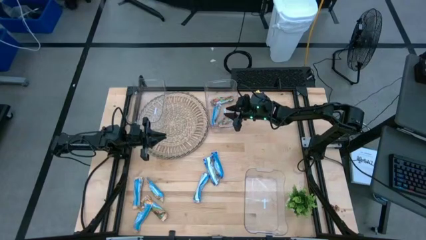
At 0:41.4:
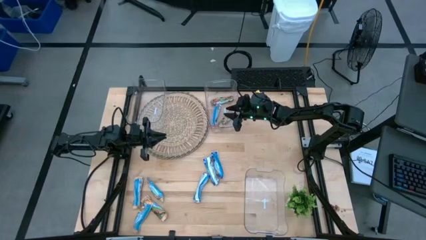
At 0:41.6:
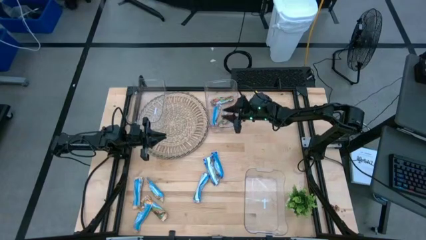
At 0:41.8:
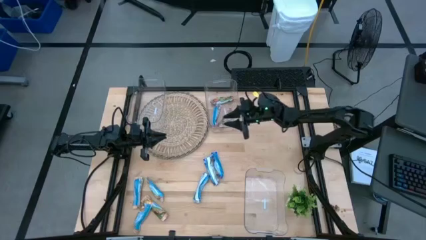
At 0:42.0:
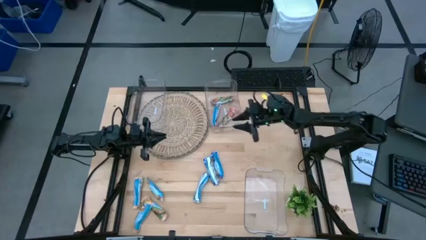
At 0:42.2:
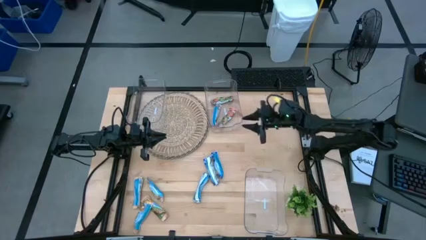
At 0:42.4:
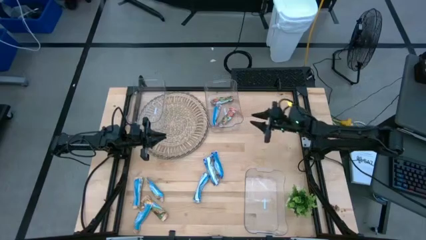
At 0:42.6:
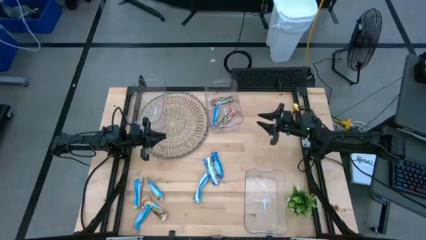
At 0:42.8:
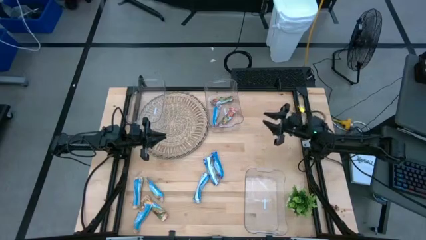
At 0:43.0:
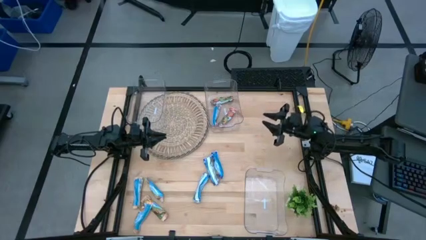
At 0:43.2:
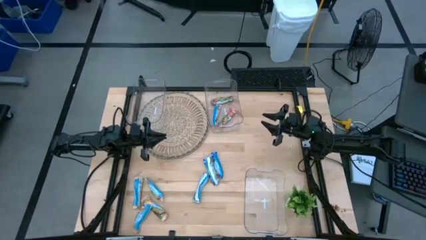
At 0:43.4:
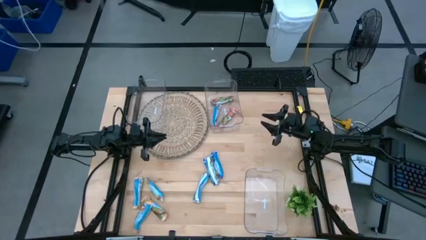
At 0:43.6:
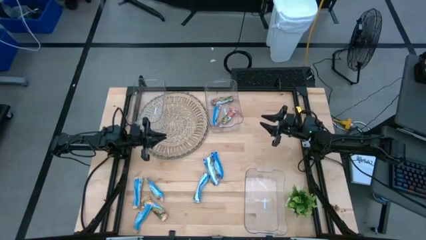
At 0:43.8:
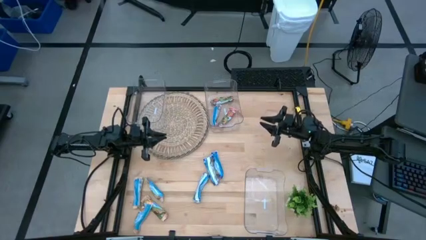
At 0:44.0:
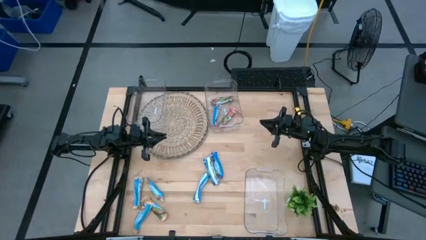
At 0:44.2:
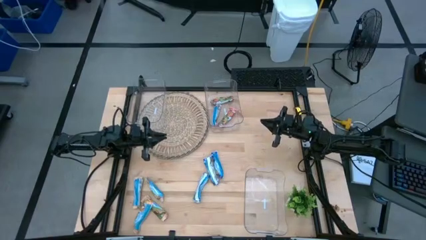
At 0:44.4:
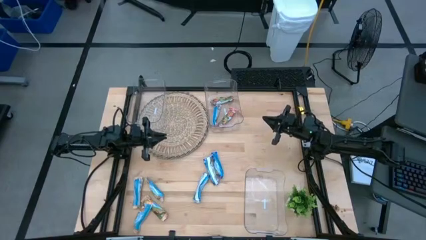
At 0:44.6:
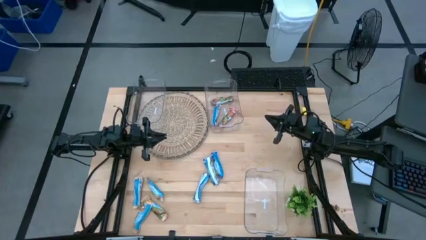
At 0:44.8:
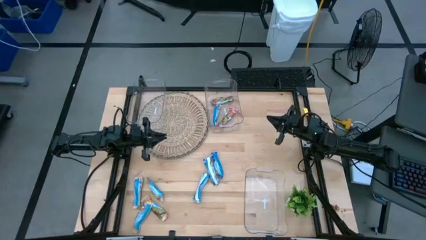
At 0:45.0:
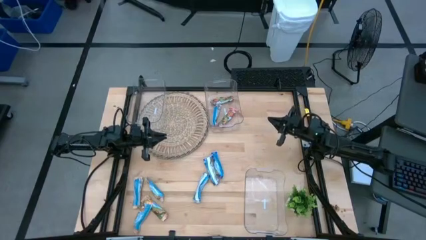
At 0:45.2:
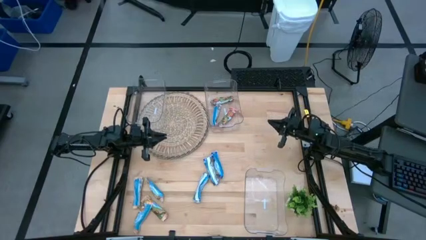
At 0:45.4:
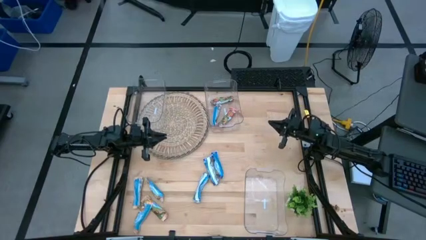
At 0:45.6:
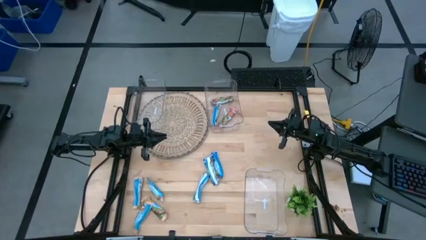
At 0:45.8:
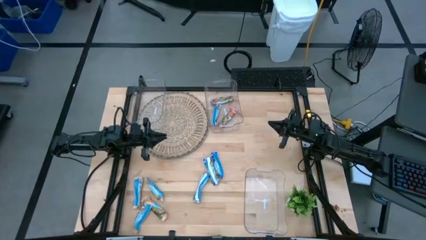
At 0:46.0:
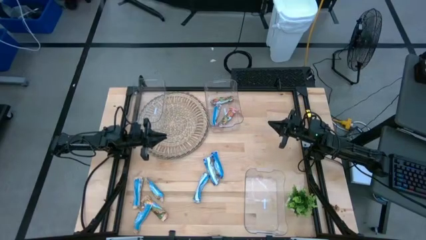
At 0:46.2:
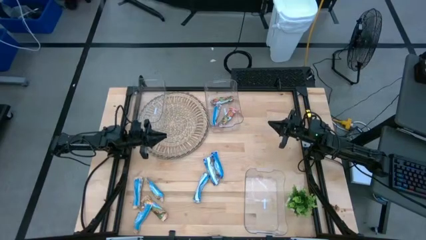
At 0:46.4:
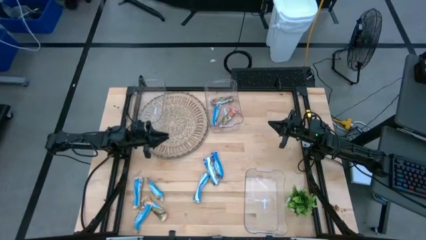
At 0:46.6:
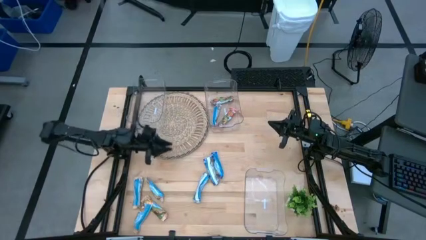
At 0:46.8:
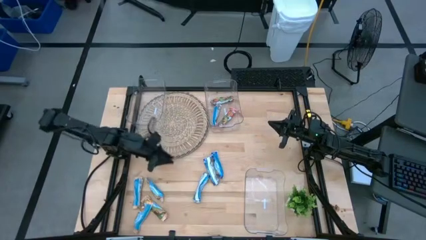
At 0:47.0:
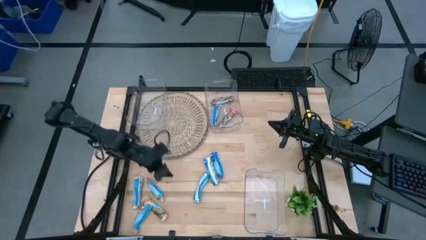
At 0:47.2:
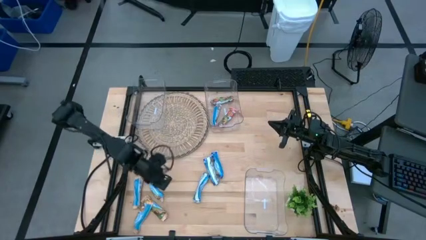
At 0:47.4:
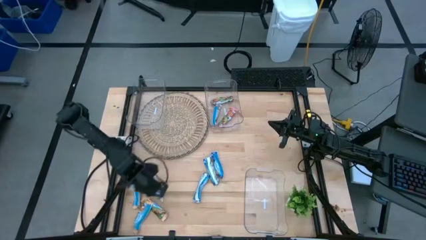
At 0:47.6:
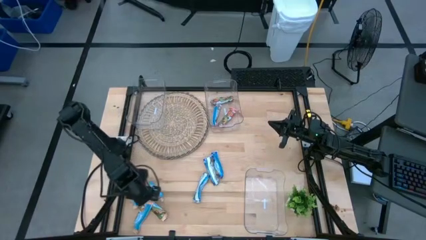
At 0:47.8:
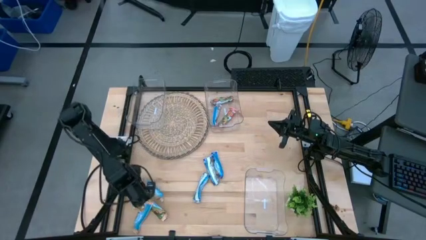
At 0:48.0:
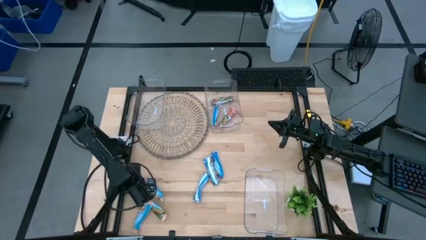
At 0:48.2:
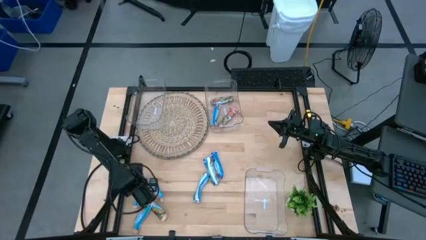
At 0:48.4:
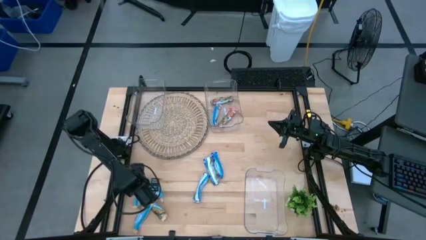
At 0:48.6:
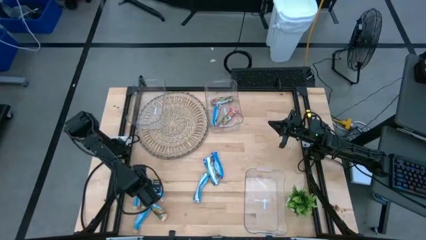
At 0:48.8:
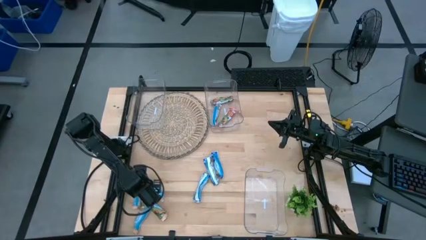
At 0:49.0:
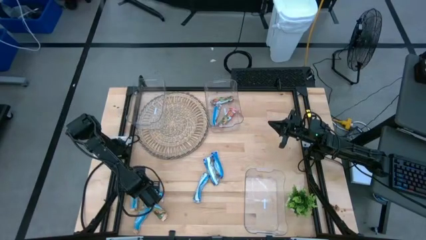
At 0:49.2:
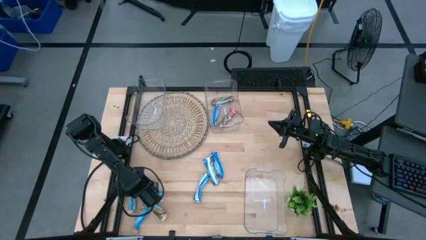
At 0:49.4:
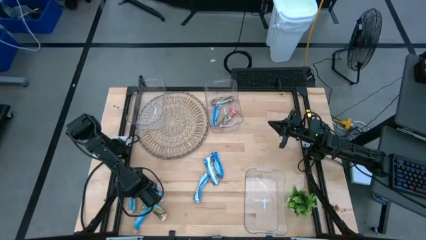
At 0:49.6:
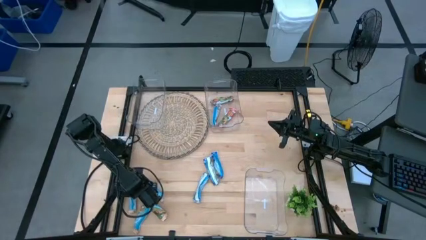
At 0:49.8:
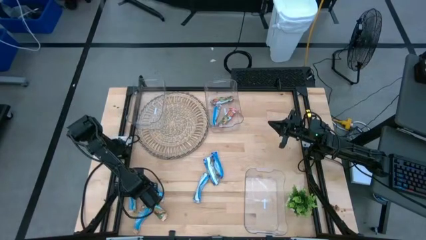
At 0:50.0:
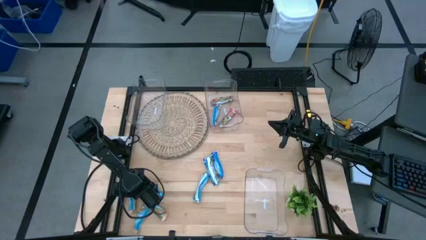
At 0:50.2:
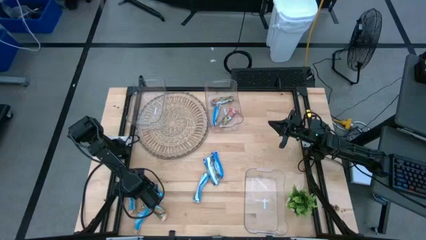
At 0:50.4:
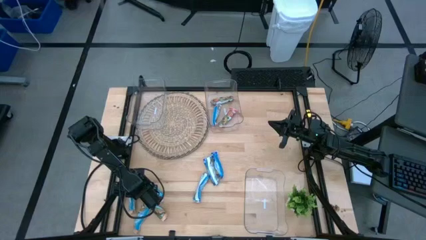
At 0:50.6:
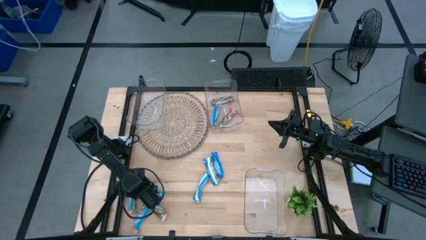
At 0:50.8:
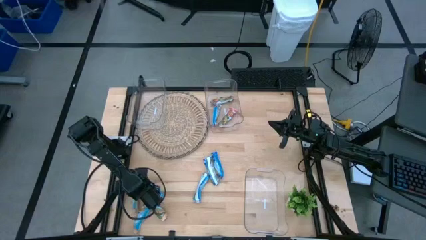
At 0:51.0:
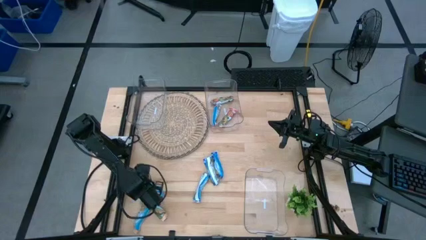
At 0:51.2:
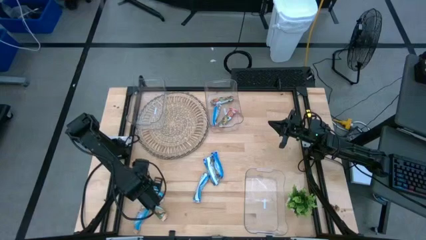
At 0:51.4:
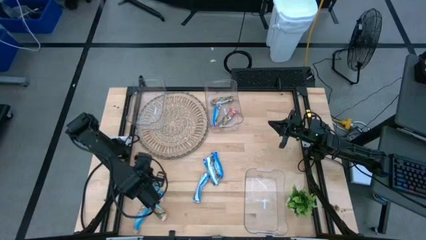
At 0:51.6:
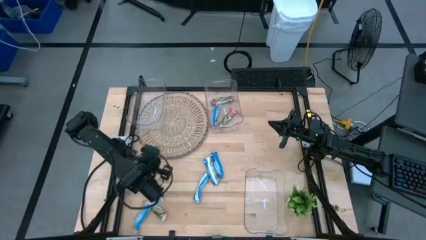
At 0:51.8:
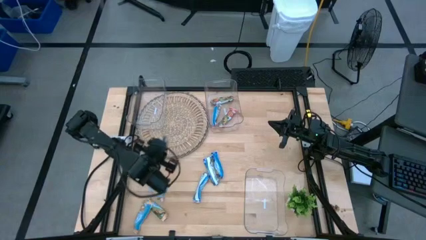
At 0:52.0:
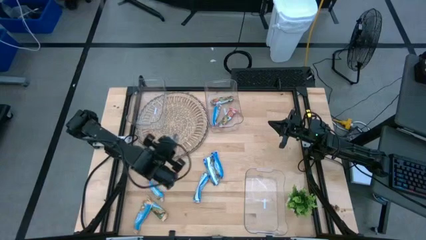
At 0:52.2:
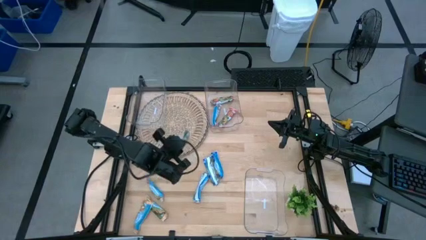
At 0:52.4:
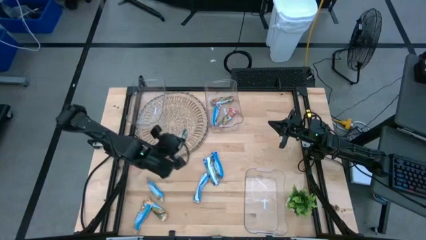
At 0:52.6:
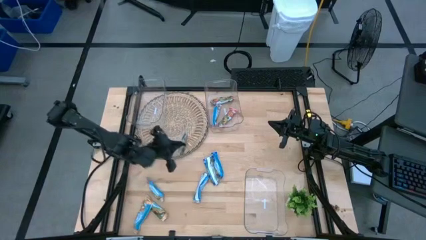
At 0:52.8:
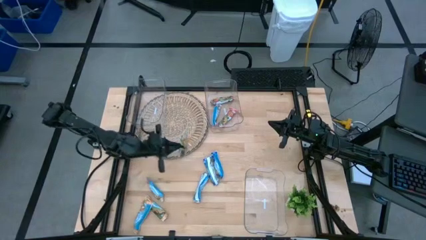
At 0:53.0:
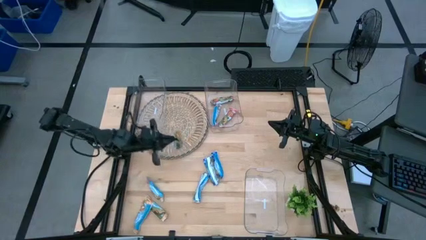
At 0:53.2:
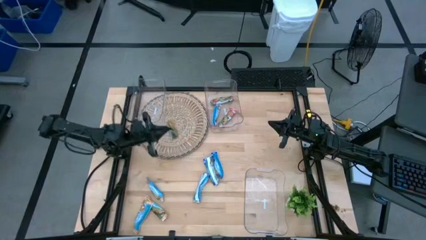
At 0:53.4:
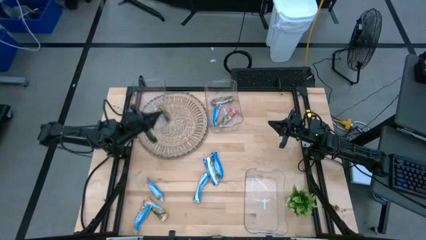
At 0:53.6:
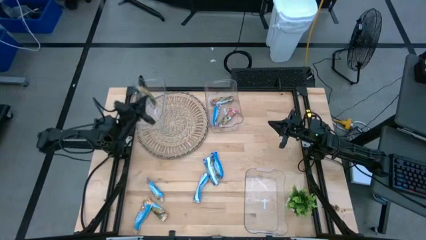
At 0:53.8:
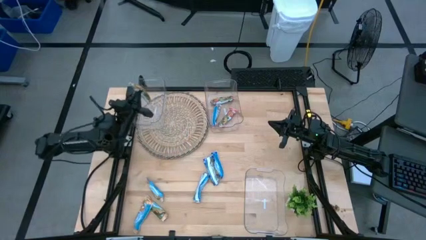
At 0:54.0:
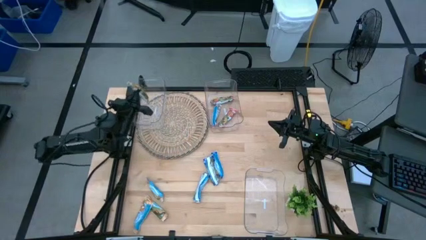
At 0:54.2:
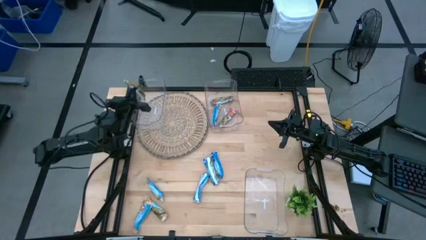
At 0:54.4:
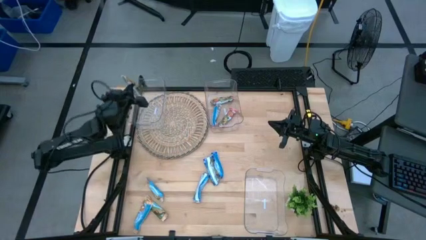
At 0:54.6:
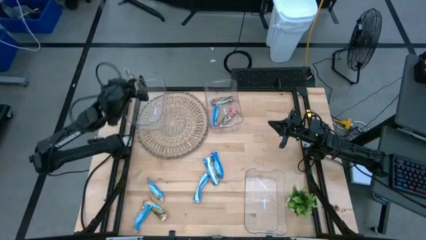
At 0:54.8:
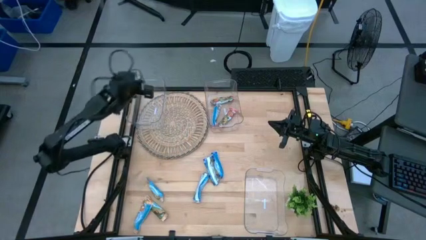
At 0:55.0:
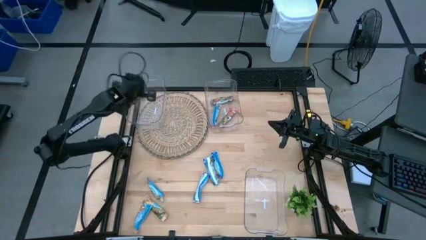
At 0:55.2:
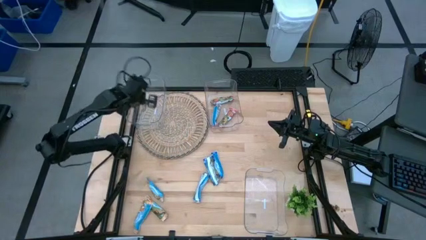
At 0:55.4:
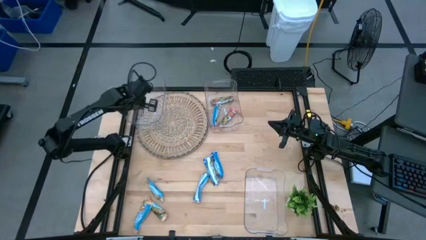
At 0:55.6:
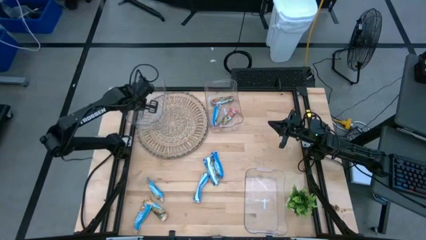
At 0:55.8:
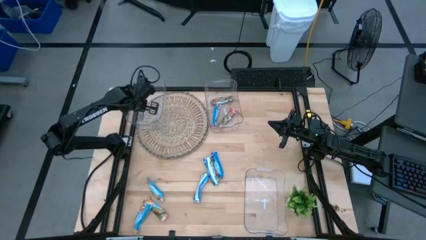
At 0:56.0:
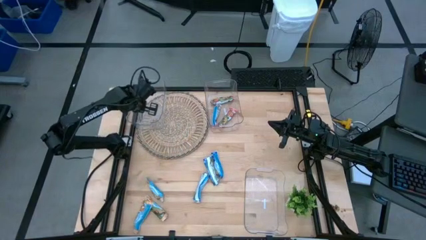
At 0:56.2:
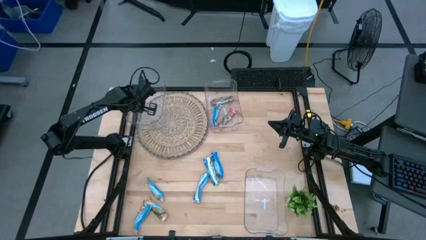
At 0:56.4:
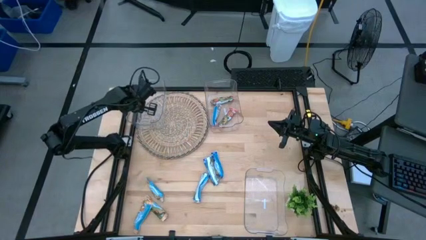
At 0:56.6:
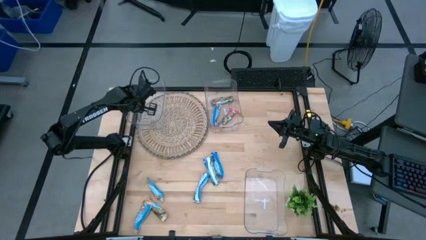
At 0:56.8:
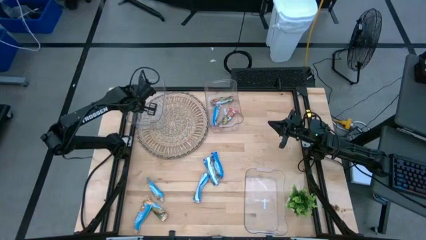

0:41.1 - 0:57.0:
Task: Pick and place Granola Bars by type
Put the yellow granola bar into the top left transparent bin
